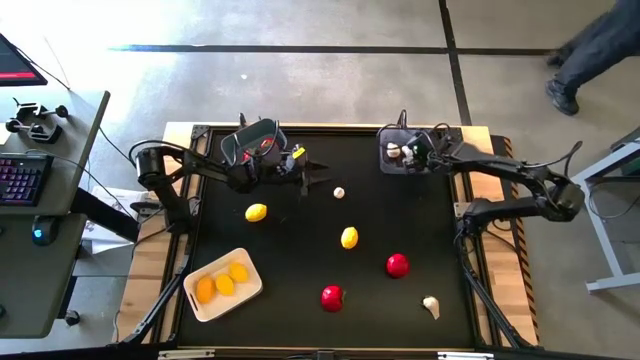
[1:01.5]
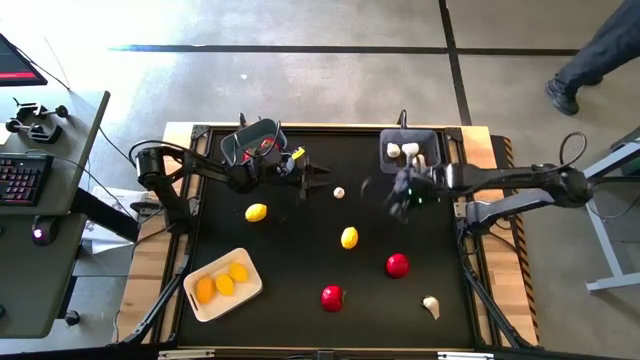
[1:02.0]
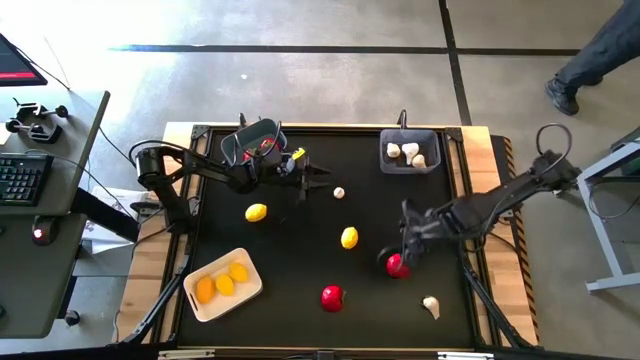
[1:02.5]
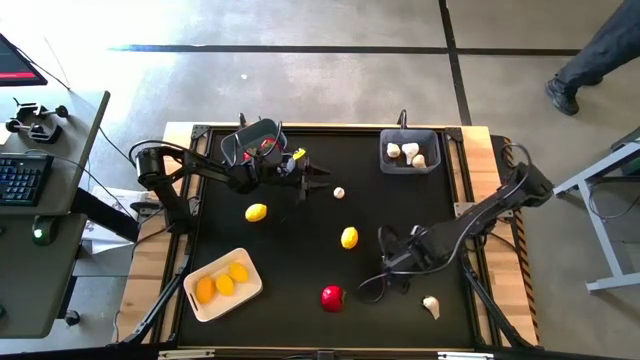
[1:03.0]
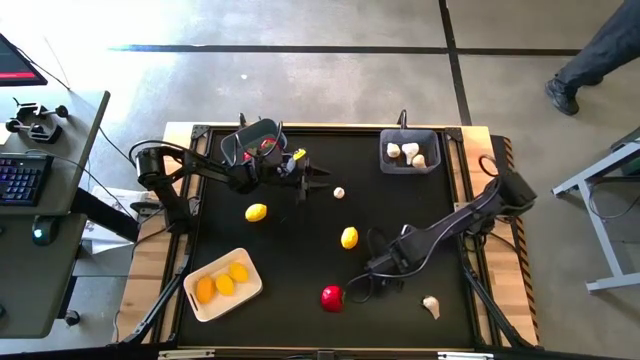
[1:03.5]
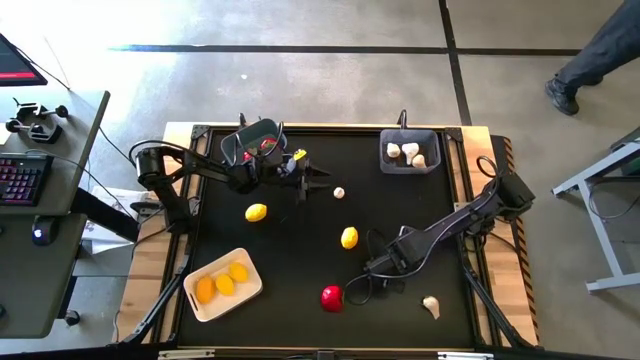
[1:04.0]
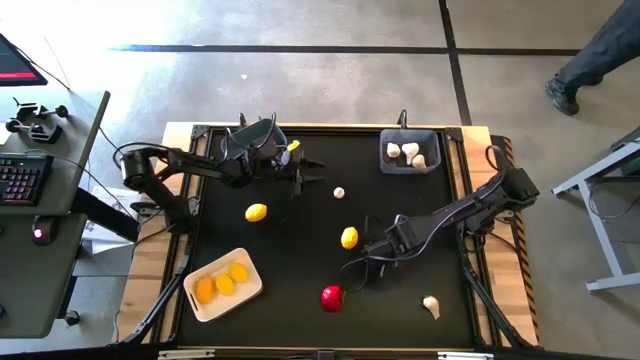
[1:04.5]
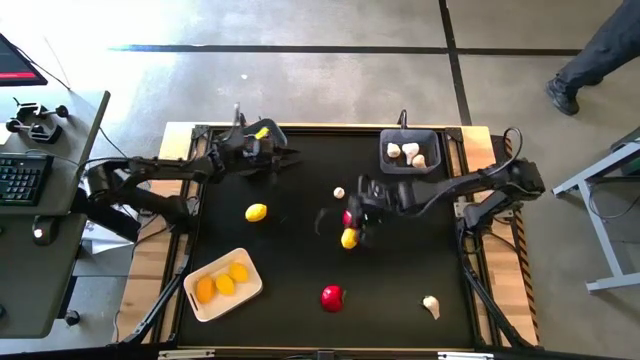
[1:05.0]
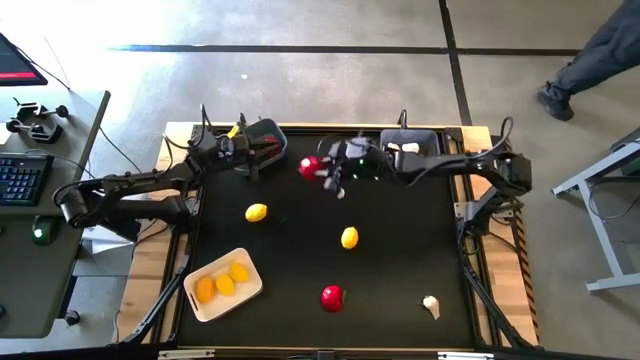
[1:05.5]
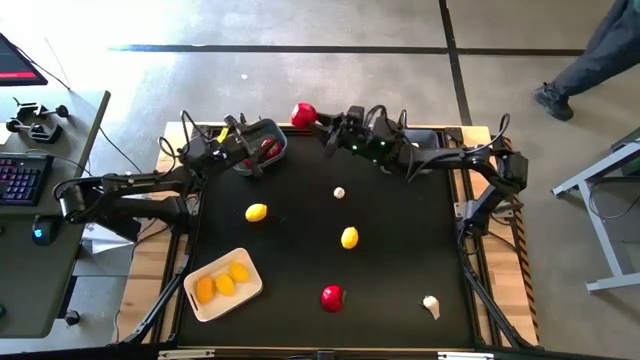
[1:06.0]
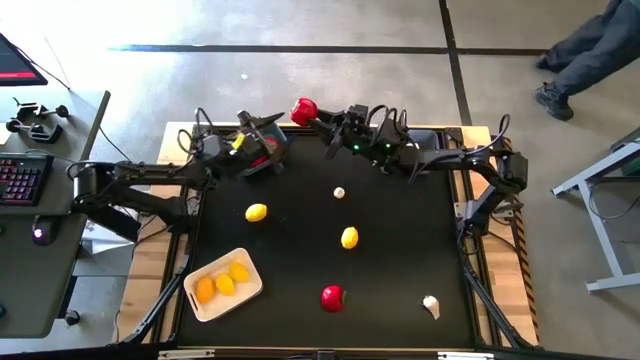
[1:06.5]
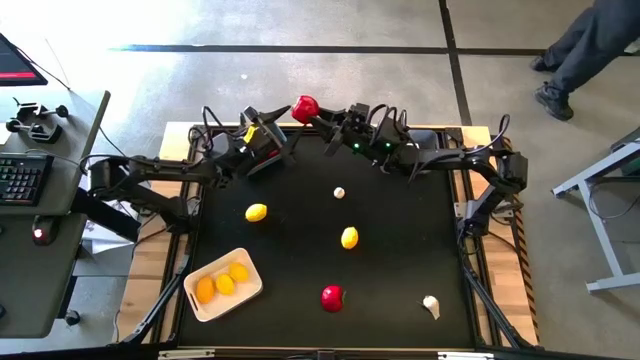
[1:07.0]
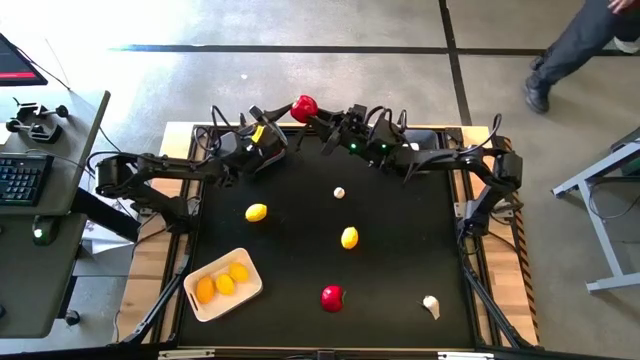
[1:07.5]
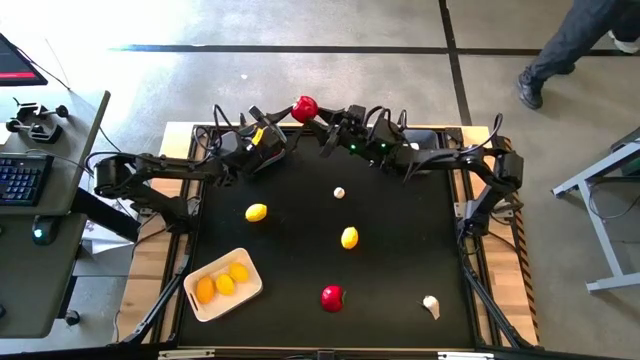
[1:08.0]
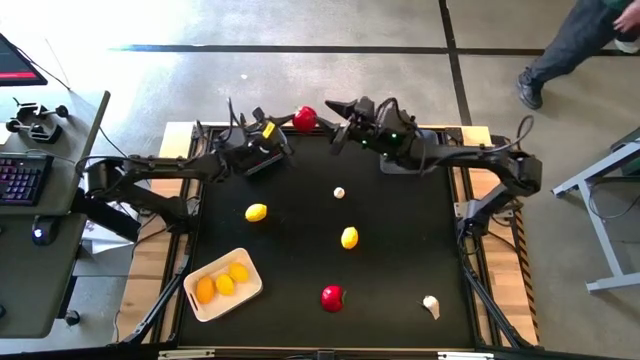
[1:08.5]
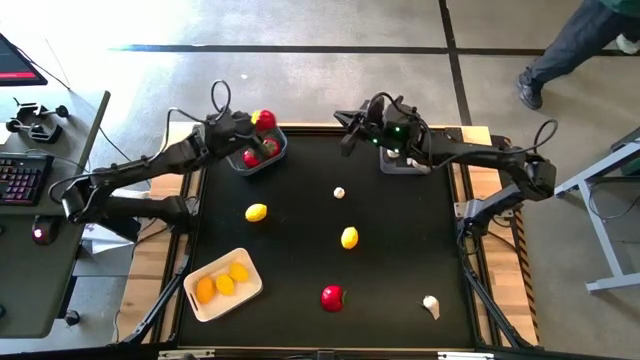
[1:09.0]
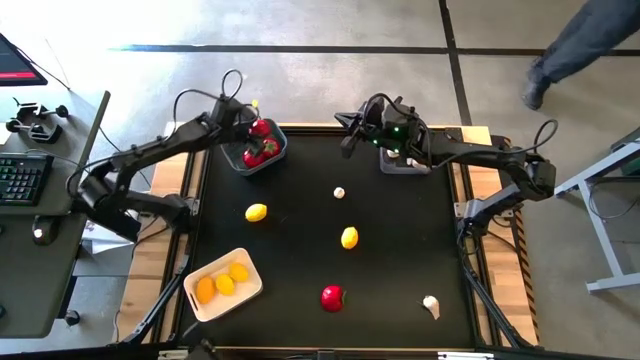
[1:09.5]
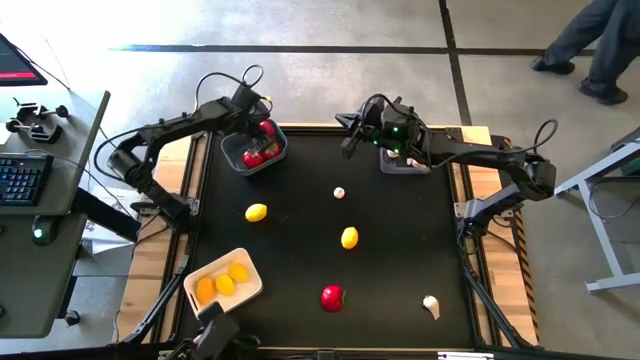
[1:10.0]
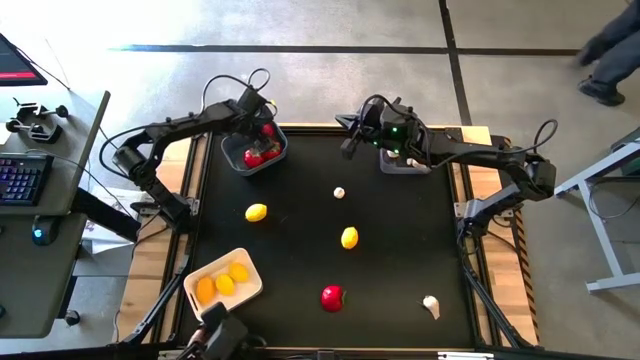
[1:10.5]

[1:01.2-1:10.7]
Task: Sort produce into baskets
Put the red tomato into the light blue bin

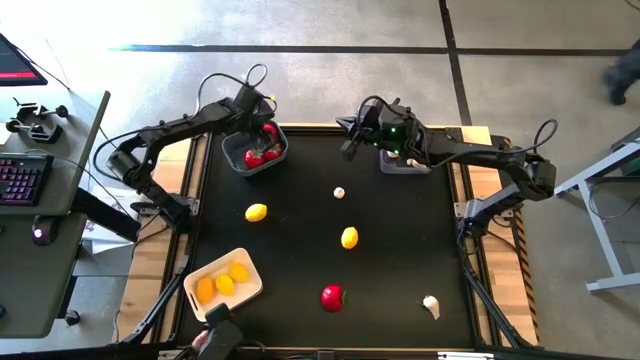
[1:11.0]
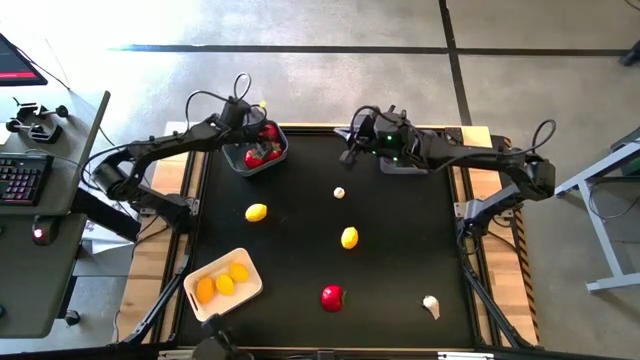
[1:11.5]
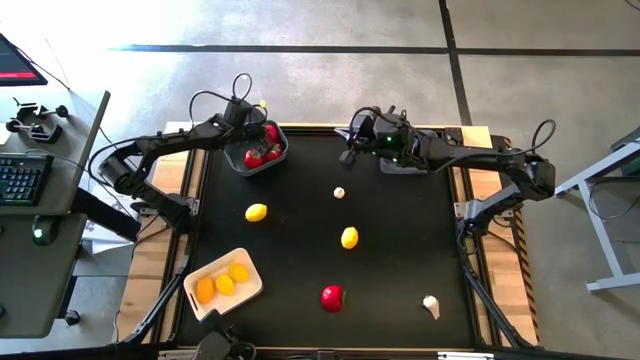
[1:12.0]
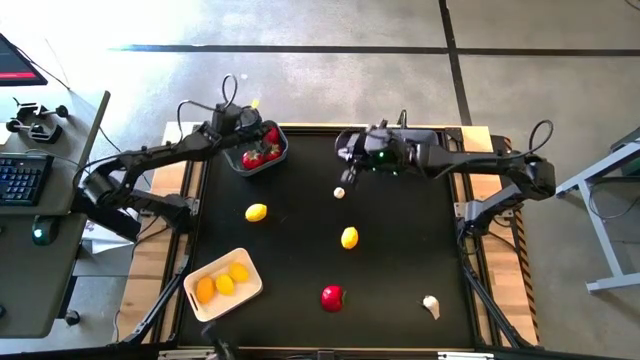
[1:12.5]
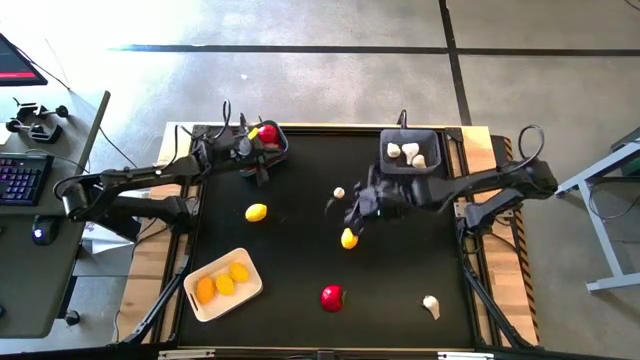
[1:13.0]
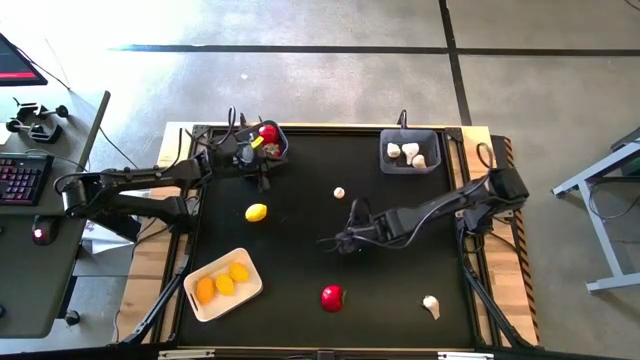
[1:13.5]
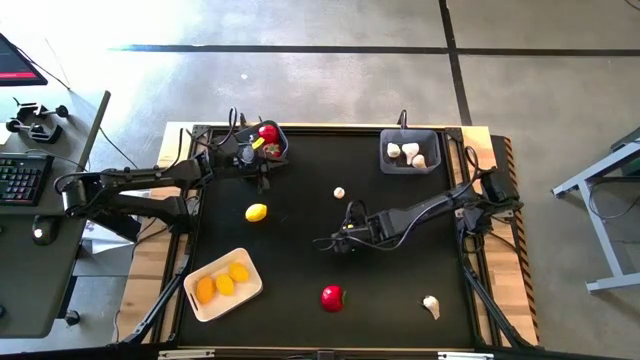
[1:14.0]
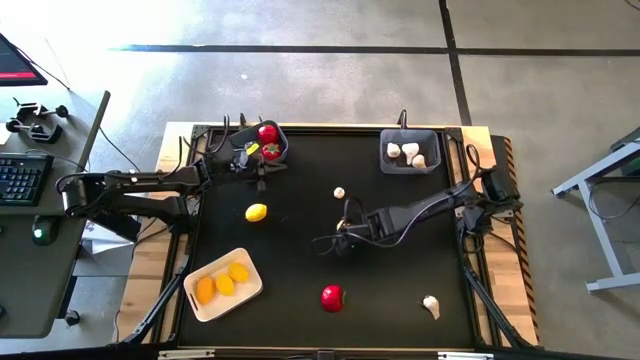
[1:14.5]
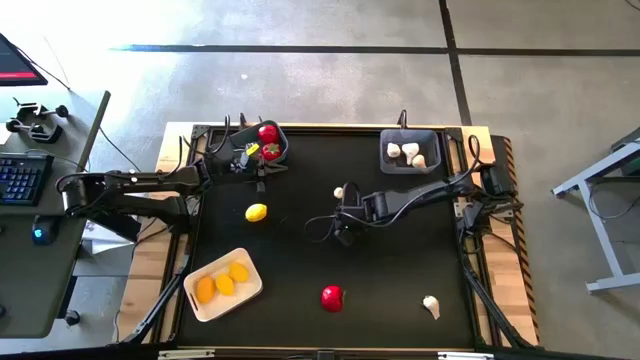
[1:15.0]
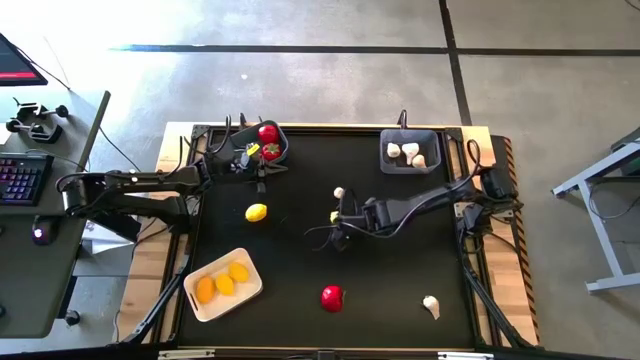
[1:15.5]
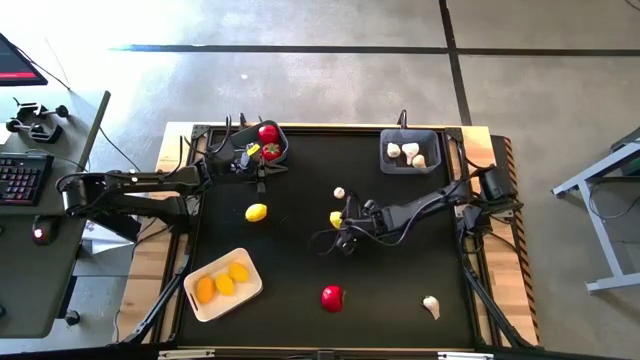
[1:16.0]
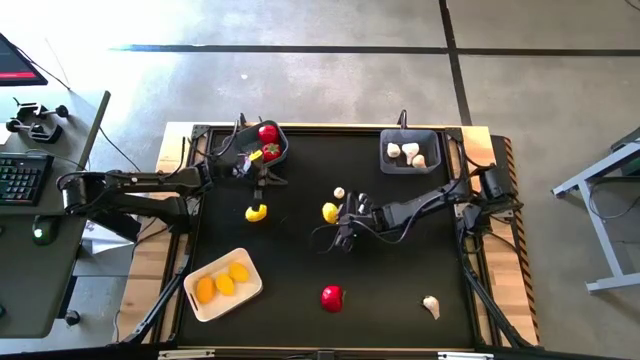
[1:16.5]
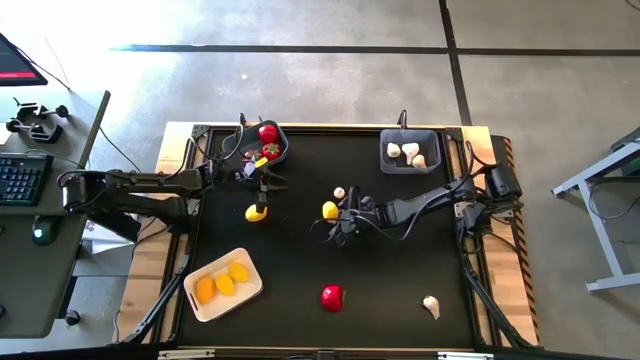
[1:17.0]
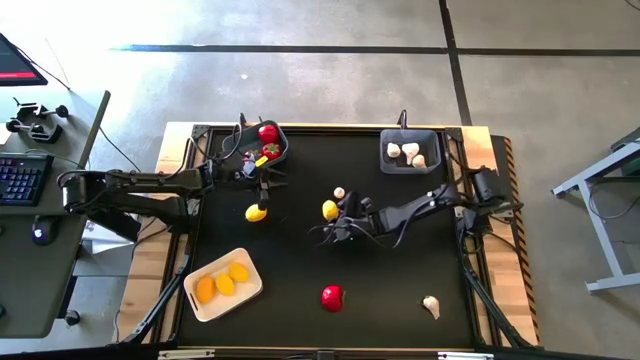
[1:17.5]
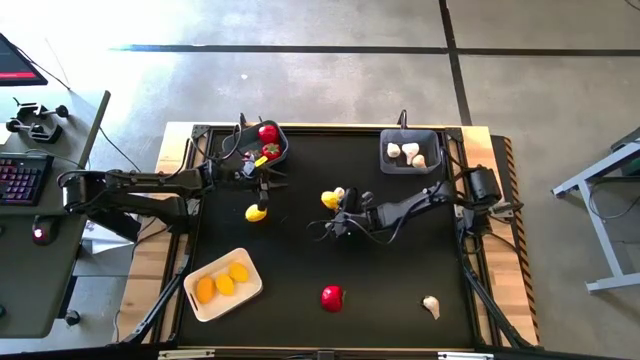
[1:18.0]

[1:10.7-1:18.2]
Put the yellow lemon into the white bin

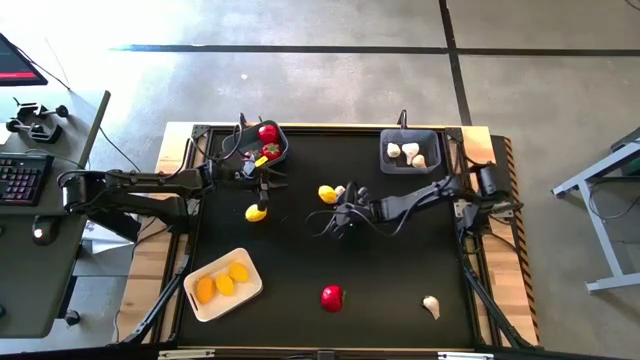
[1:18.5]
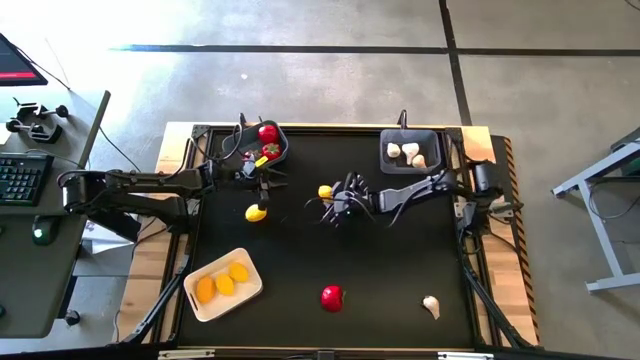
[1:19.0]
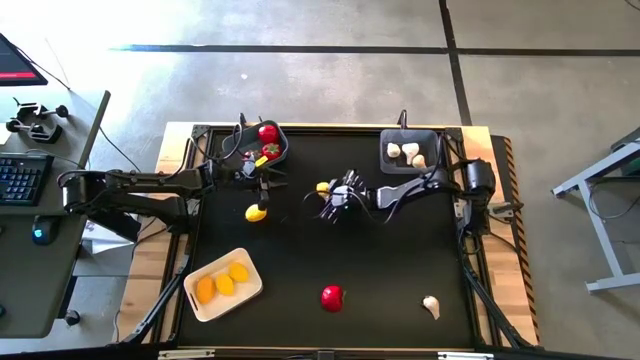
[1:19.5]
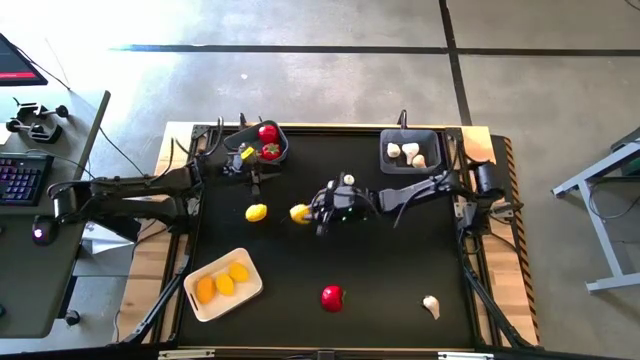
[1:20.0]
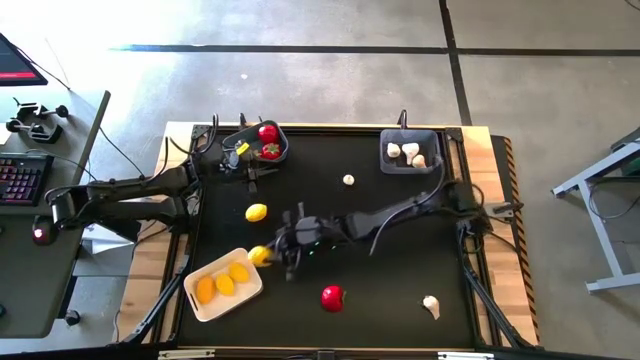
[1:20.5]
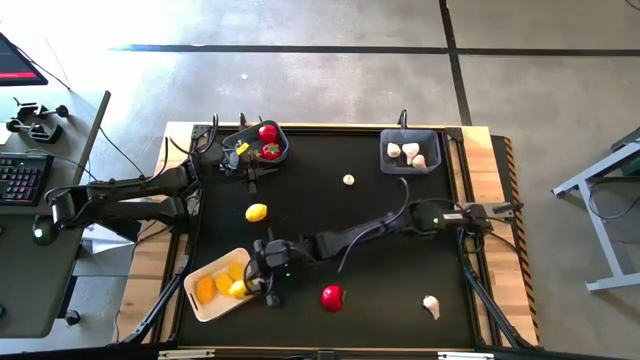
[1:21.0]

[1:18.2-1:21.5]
Put the yellow lemon into the white bin

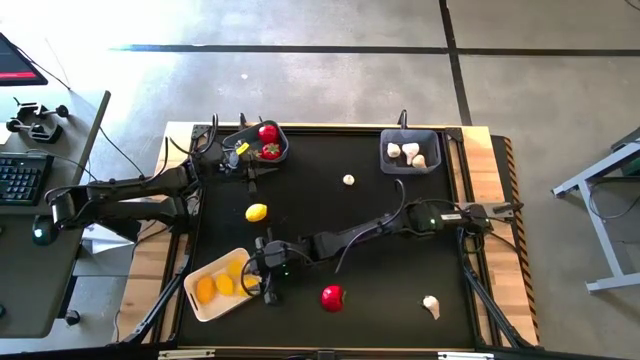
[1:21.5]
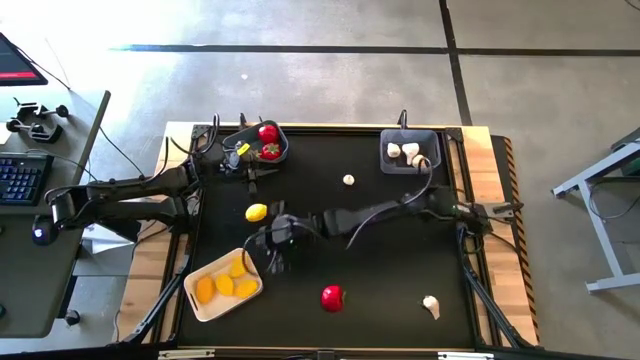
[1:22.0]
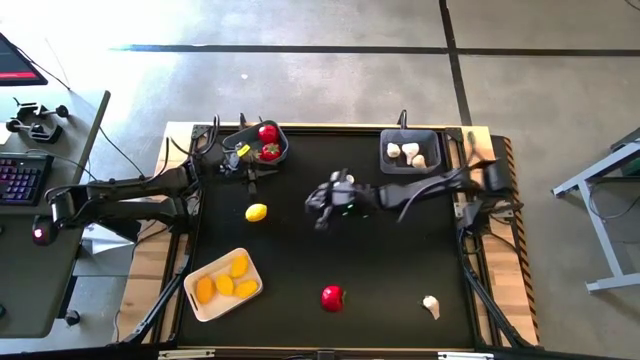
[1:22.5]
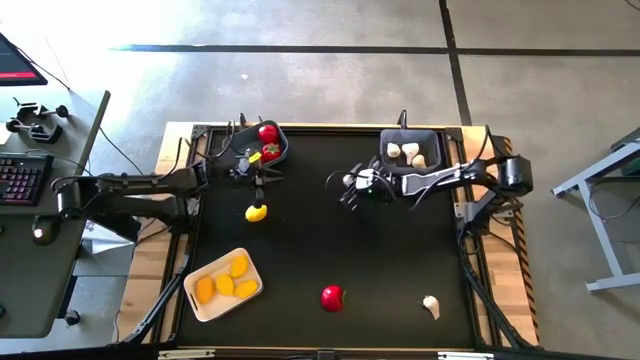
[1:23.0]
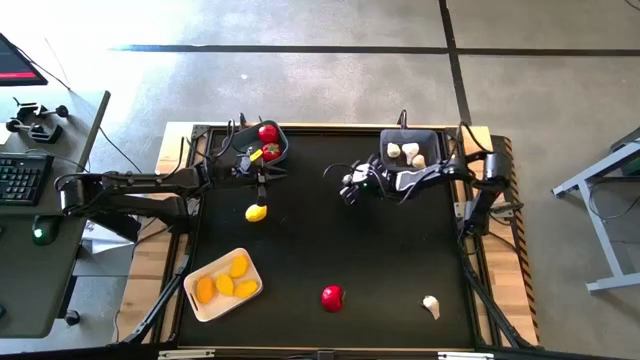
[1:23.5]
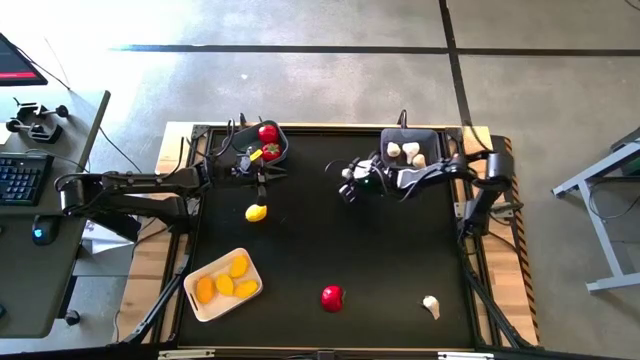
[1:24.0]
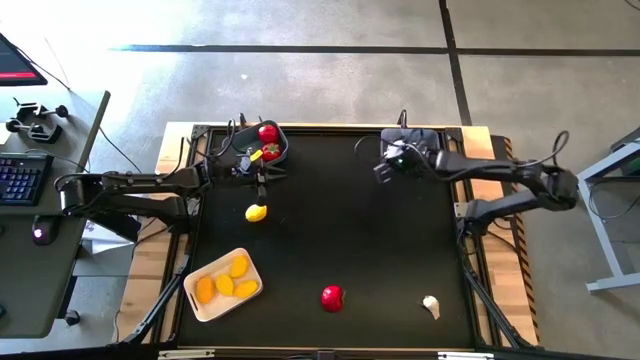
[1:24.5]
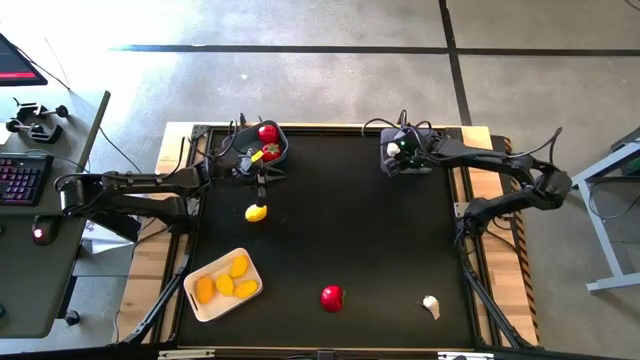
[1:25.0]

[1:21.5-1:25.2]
Put the white garlic into the transparent bin
